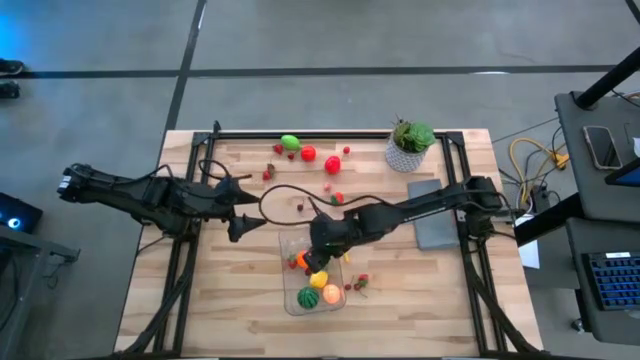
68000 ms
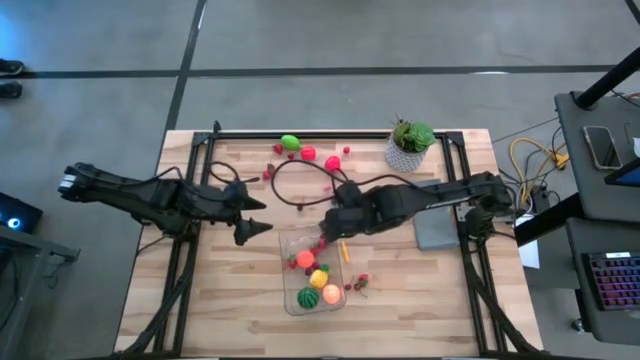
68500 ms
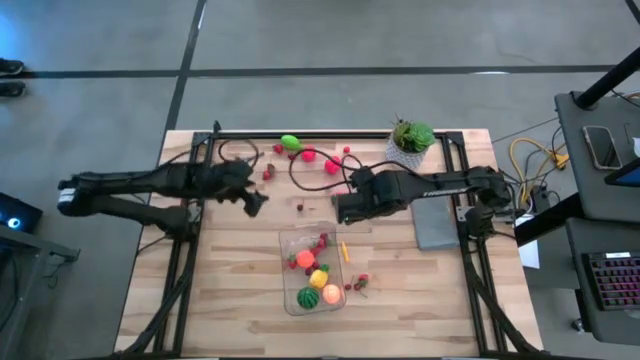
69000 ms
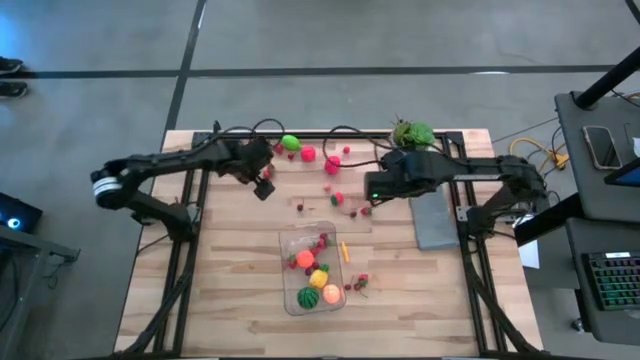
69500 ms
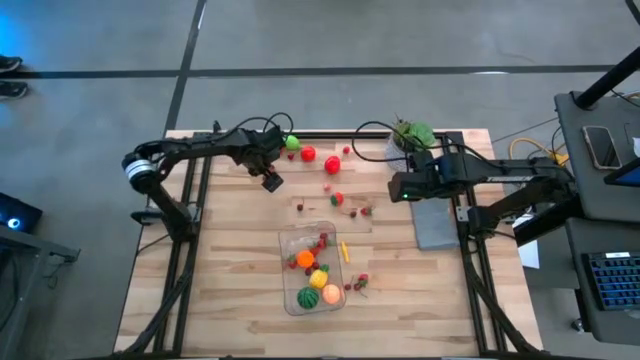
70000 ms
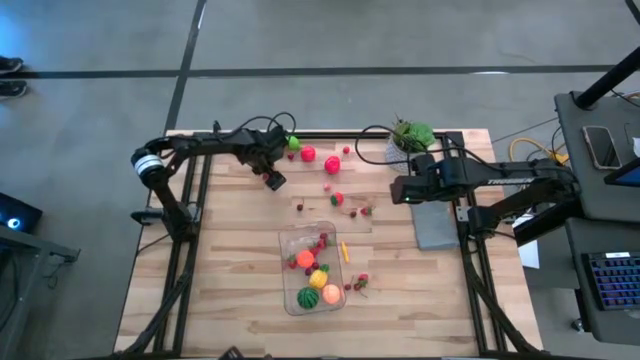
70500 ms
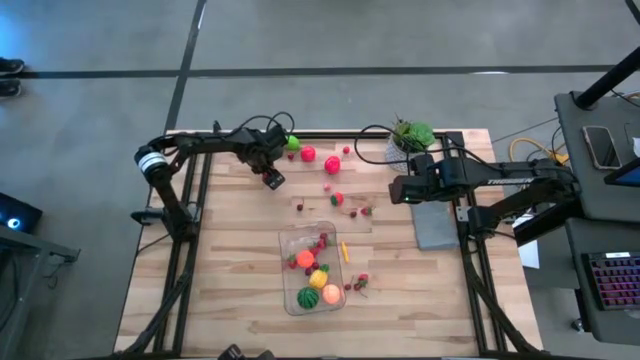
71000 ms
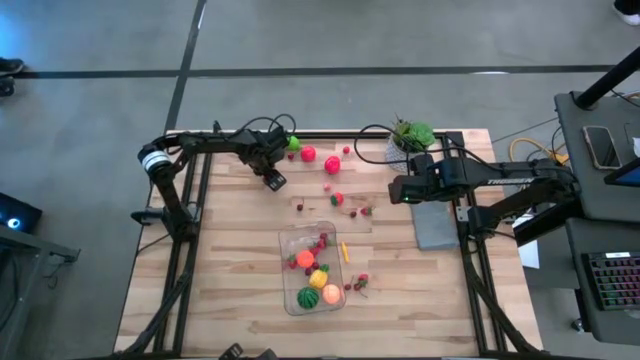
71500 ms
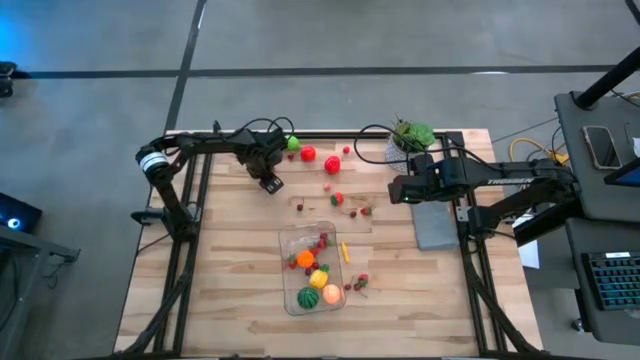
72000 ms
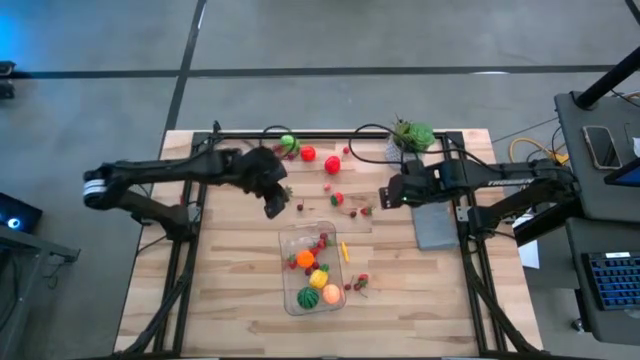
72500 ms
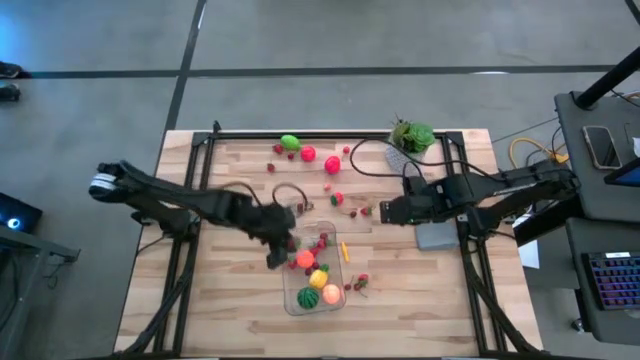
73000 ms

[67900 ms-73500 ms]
Task: Pick and placing Produce into tupperware
Put the red strawberry into the transparent bin

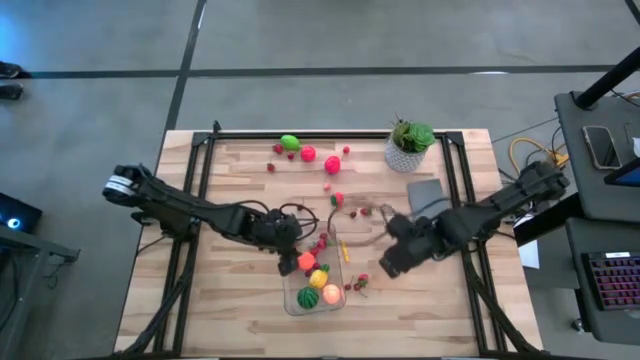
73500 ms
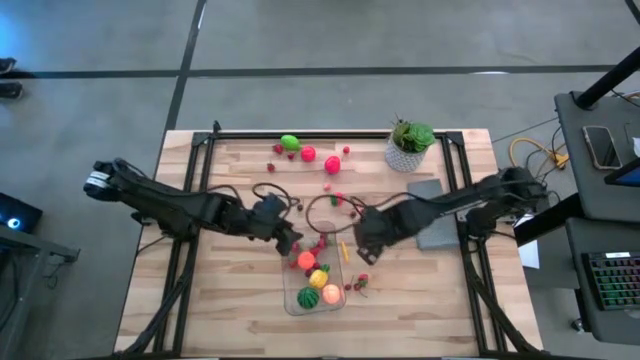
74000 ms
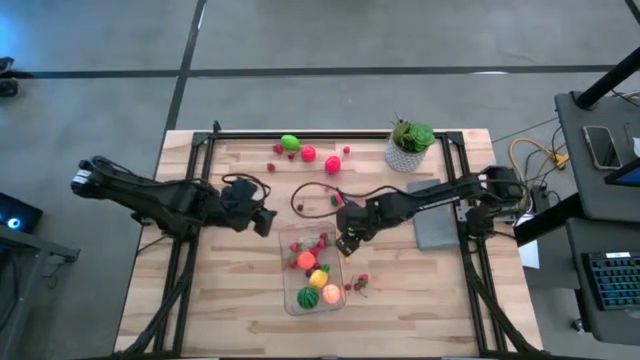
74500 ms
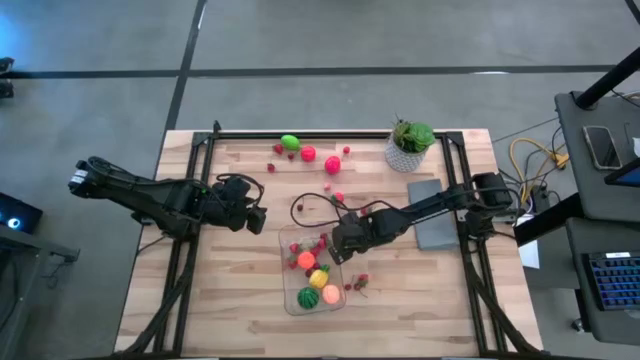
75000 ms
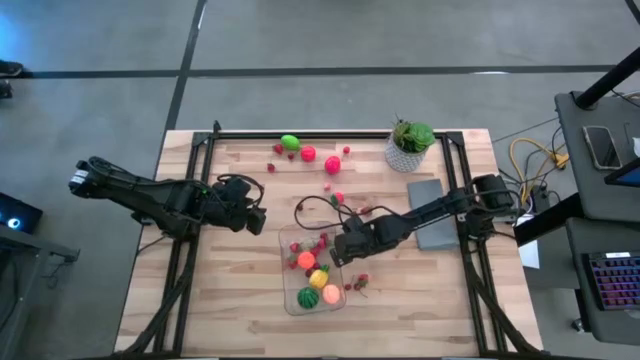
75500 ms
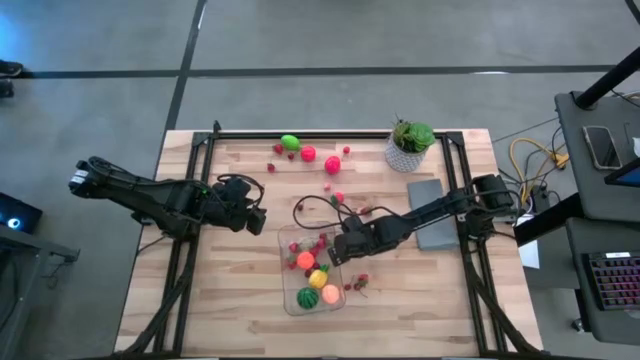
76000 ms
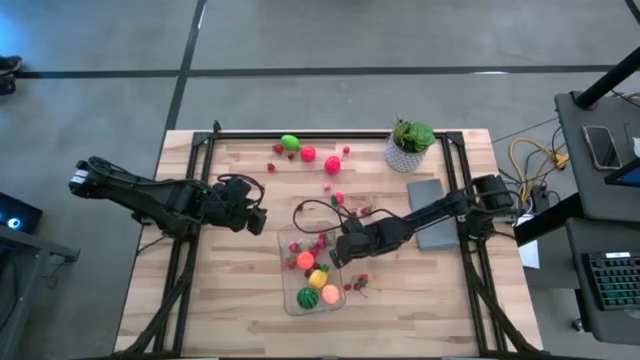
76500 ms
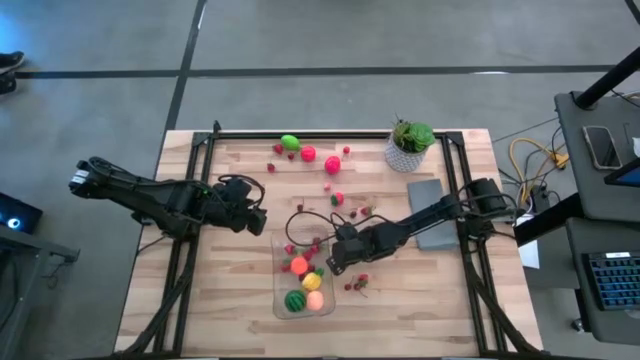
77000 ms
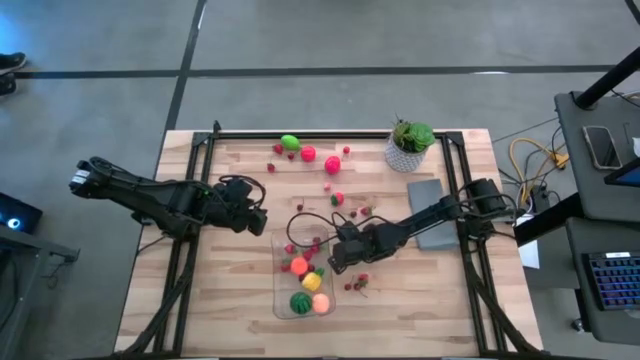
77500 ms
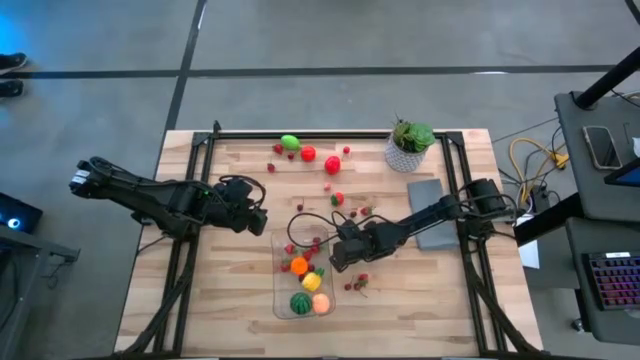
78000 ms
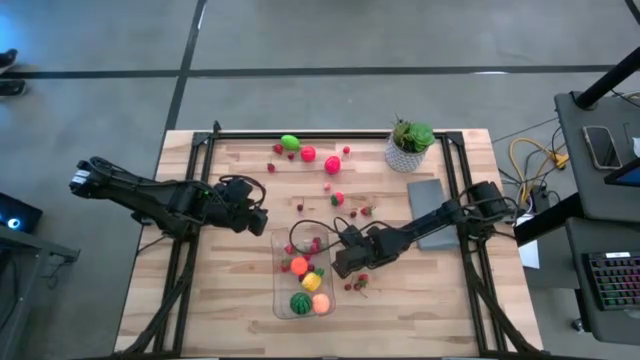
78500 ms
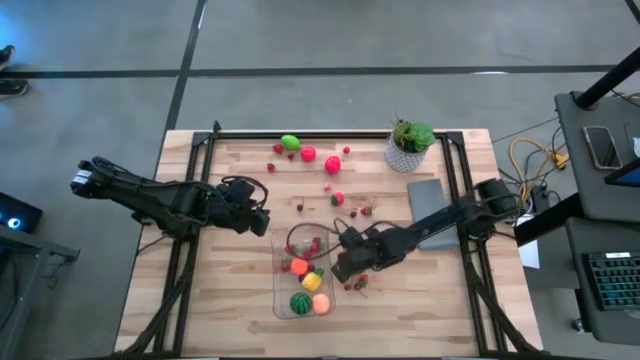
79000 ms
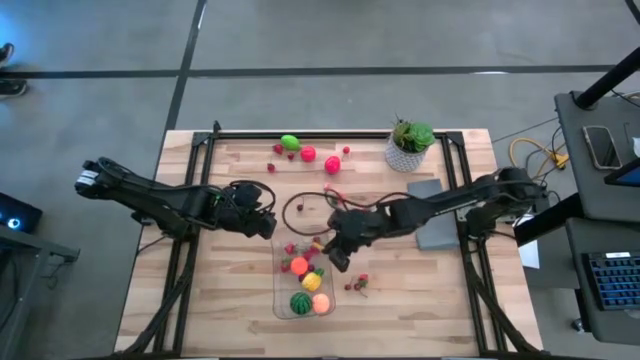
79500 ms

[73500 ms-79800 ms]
Put the yellow corn into the transparent bin

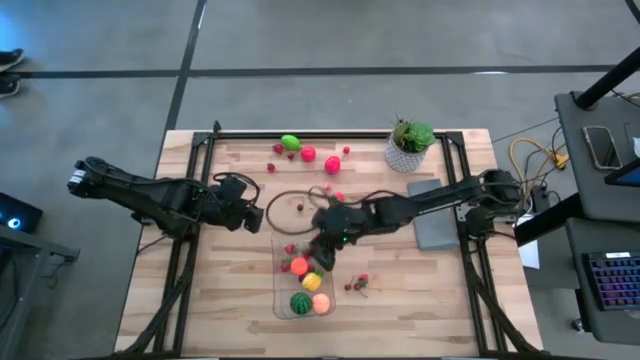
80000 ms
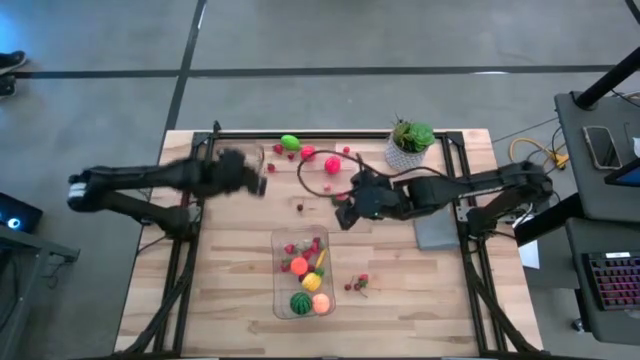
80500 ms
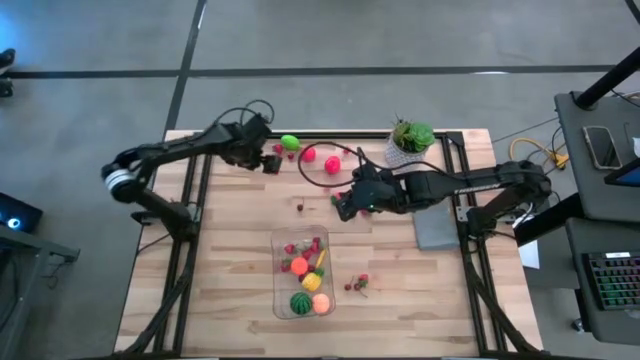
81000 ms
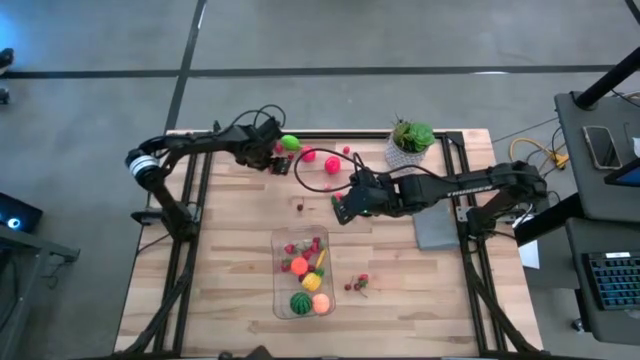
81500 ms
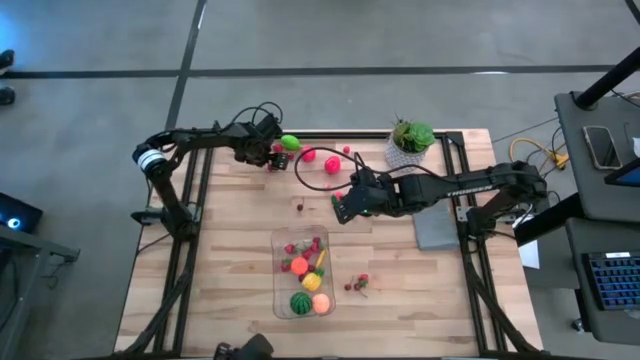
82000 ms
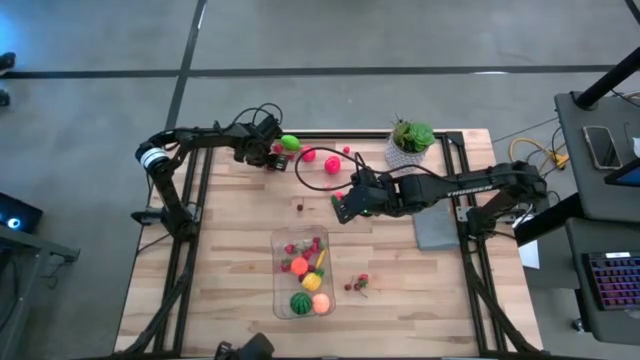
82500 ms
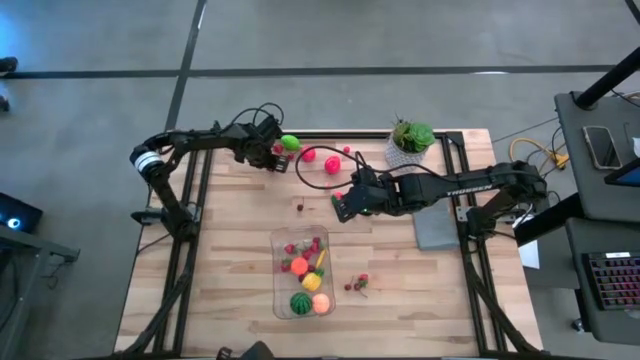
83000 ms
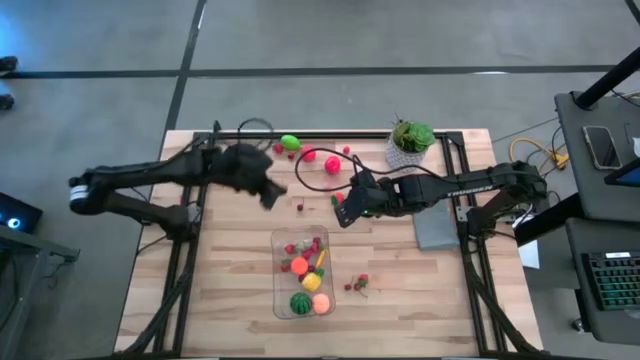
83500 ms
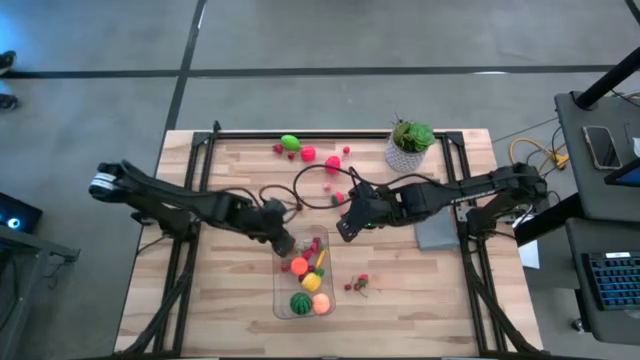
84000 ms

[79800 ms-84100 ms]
Put the red strawberry into the transparent bin

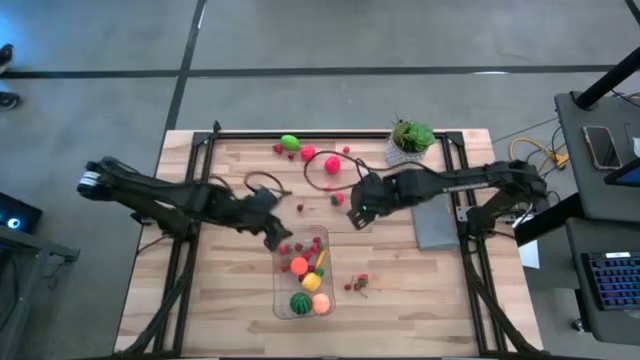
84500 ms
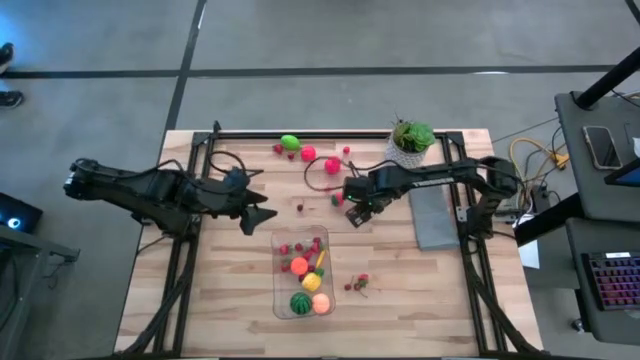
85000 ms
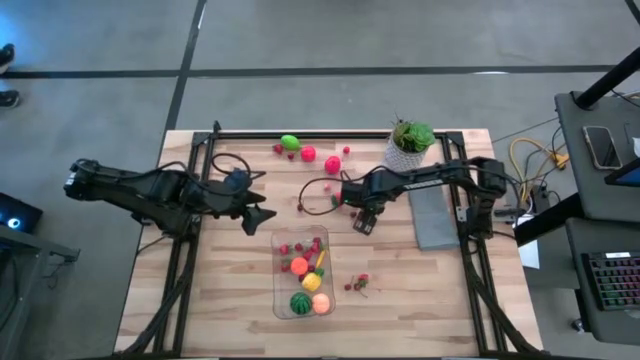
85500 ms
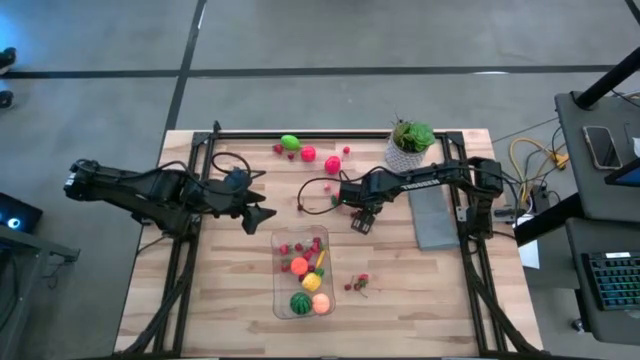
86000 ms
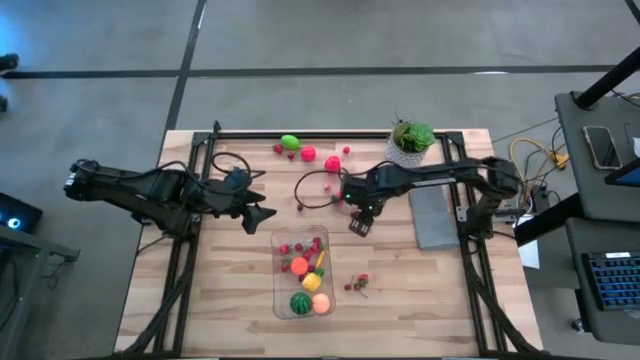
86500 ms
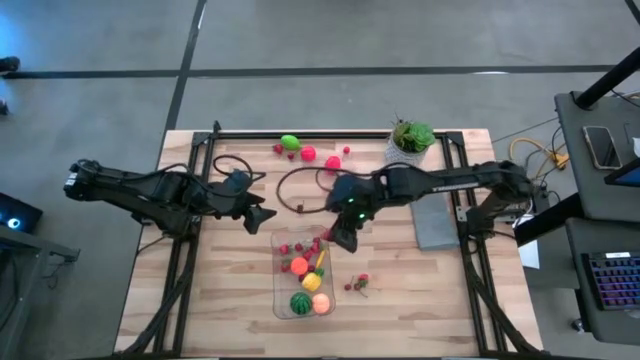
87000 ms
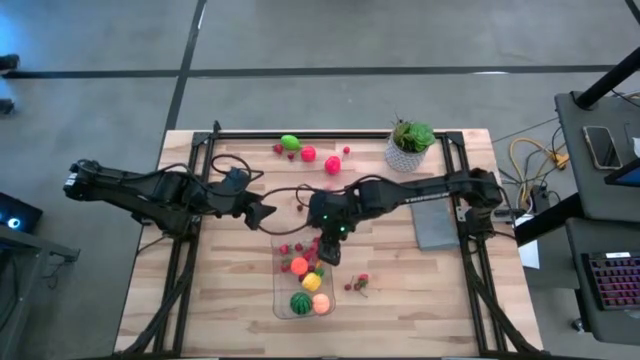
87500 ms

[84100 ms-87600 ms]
Put the red strawberry into the transparent bin
